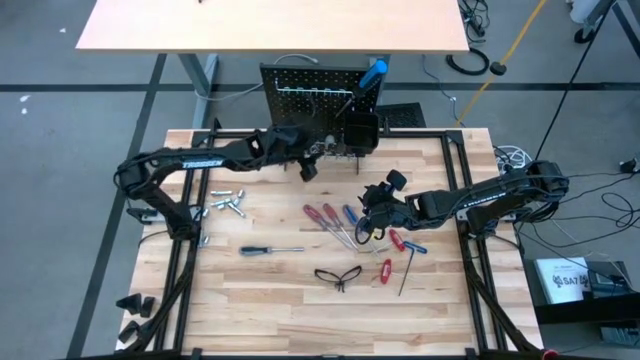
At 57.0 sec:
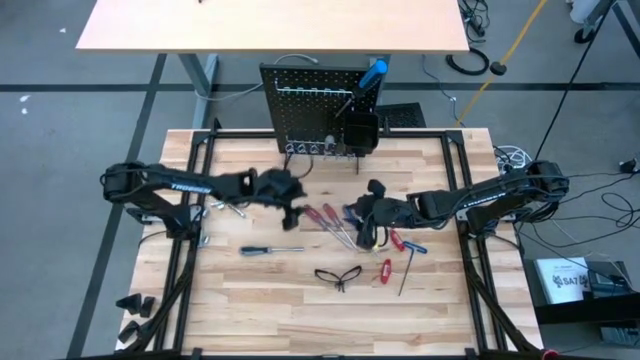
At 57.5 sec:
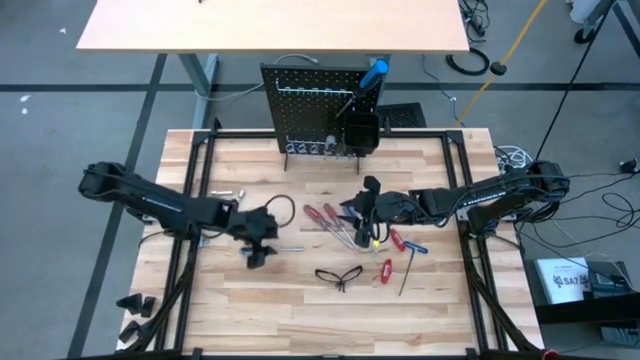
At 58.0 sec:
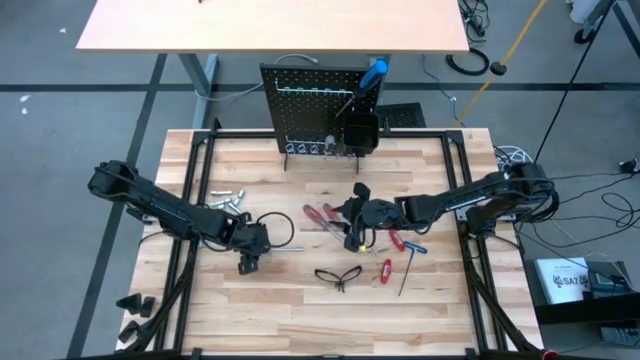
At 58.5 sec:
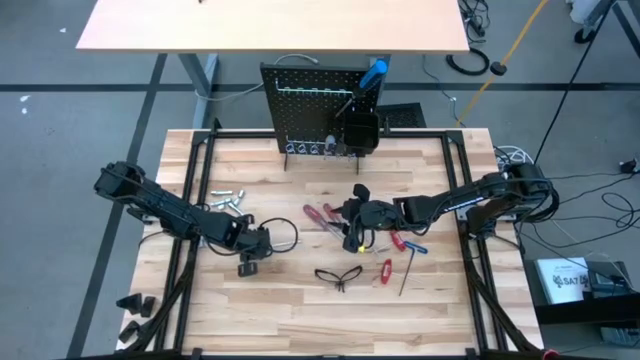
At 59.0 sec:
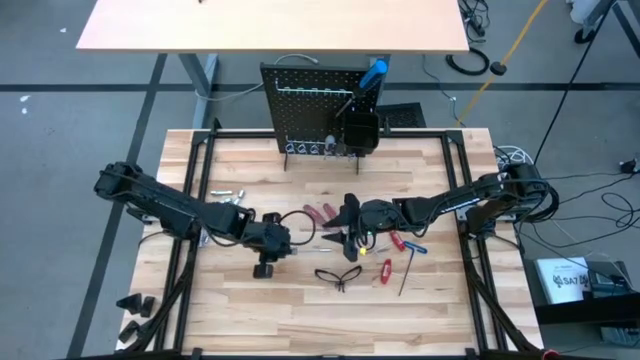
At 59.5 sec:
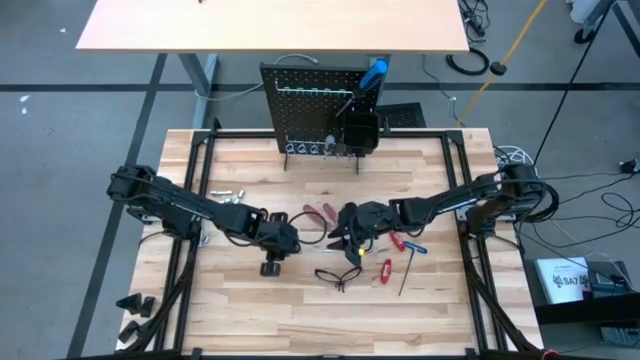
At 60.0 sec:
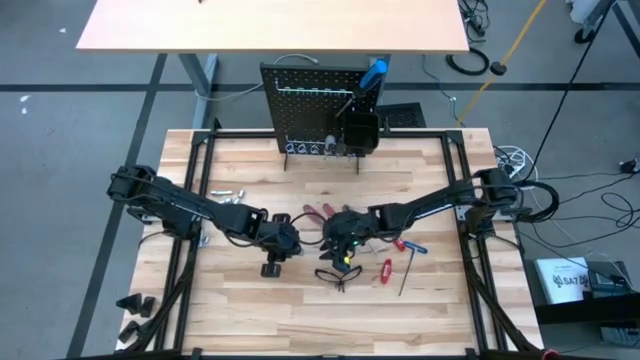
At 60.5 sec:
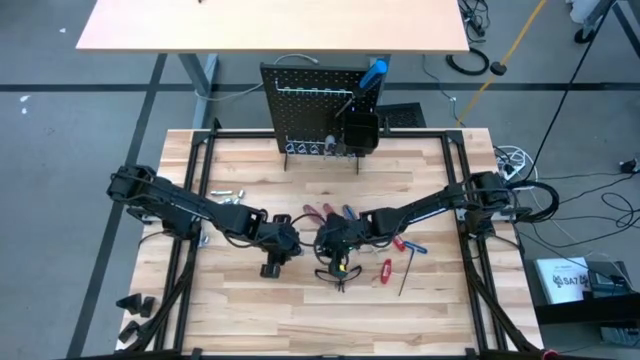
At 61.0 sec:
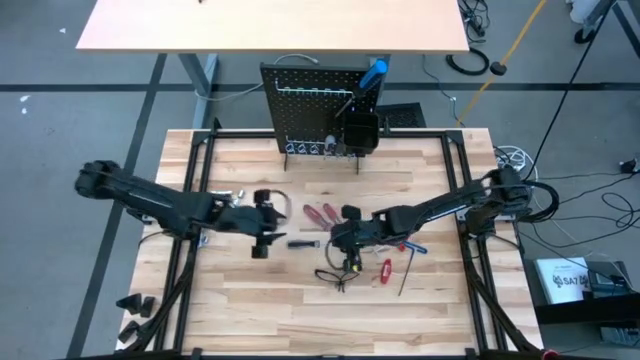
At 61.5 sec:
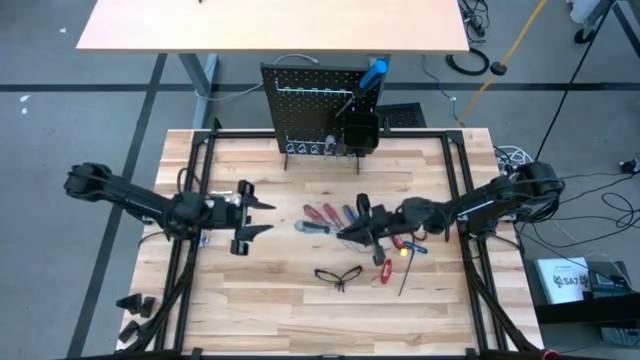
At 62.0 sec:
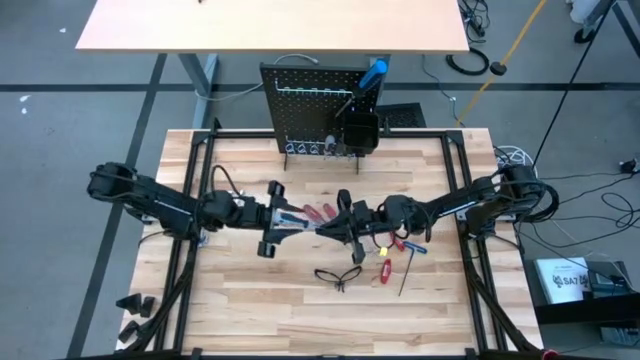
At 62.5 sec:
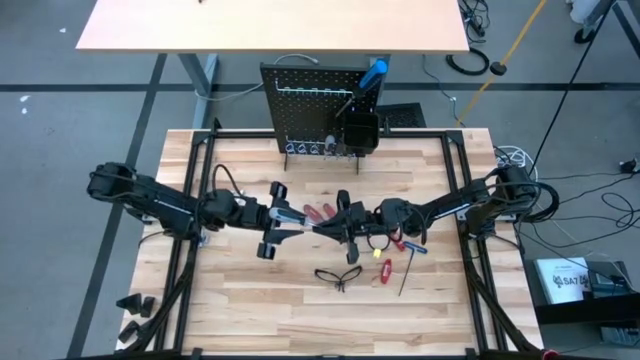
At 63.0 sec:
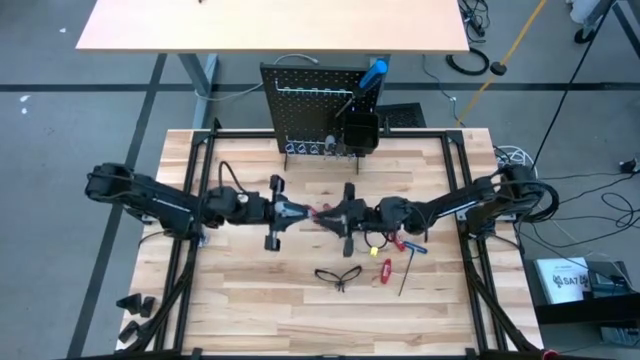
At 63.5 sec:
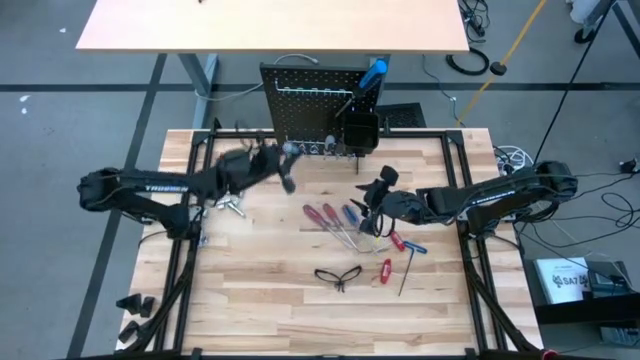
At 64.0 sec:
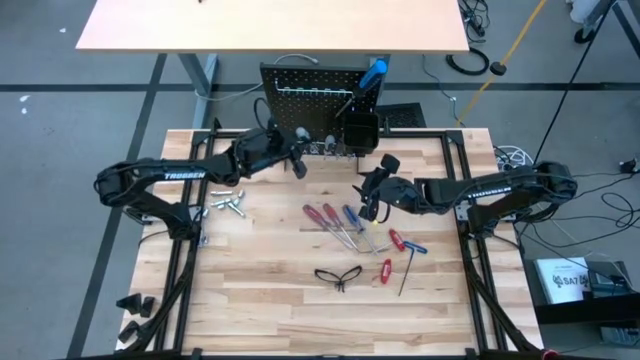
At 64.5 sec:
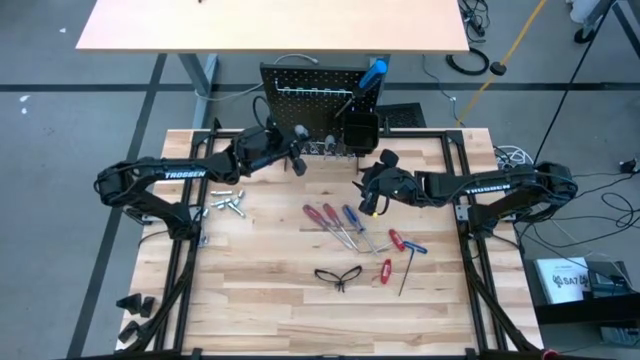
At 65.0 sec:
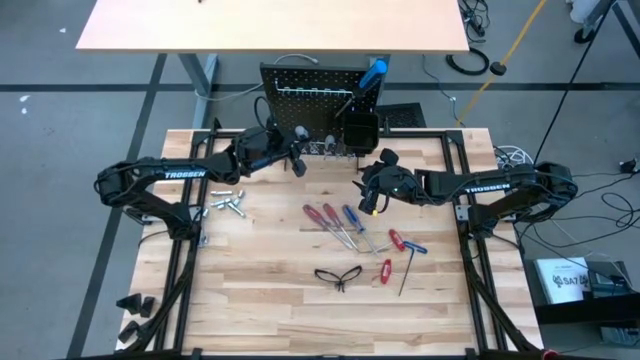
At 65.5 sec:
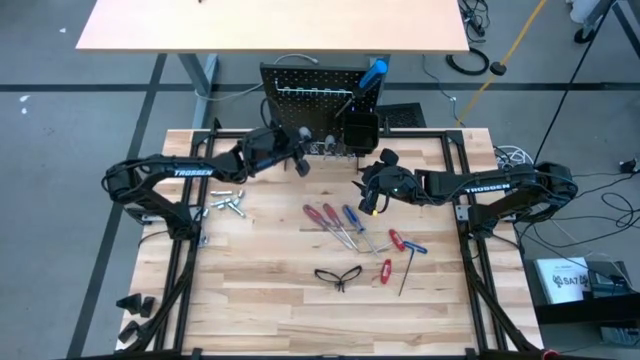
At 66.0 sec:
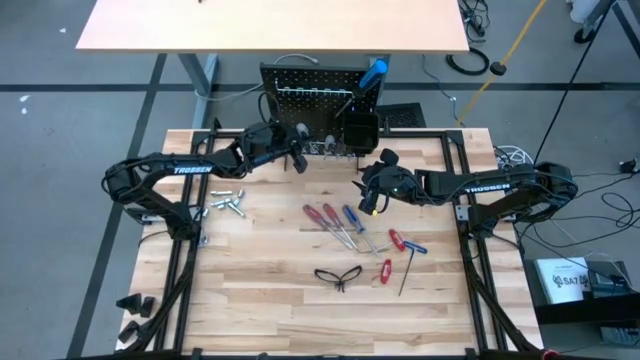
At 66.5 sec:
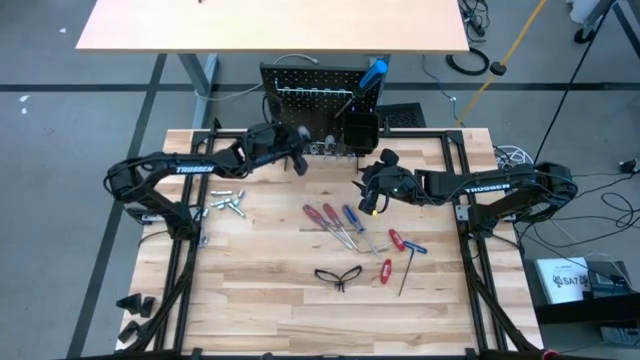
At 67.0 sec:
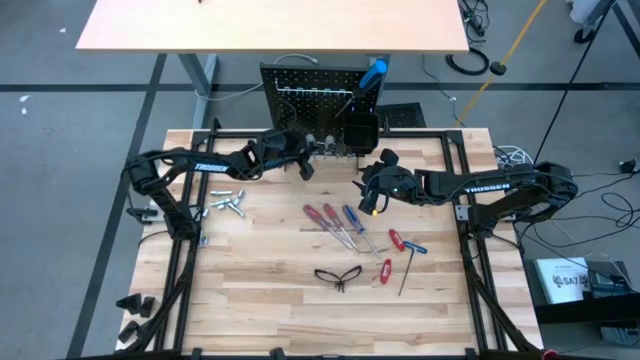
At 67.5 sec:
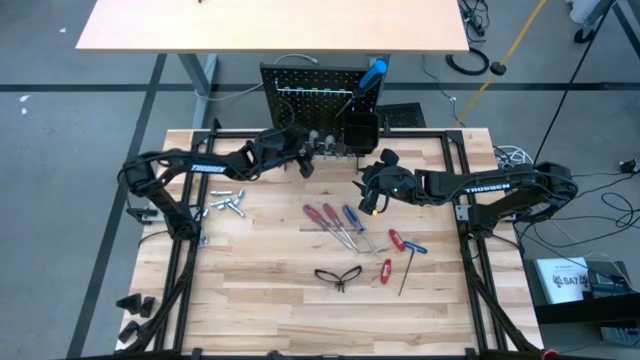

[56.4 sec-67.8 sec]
Task: Hang tools onto peg board
Hang the gray screwdriver onto the peg board

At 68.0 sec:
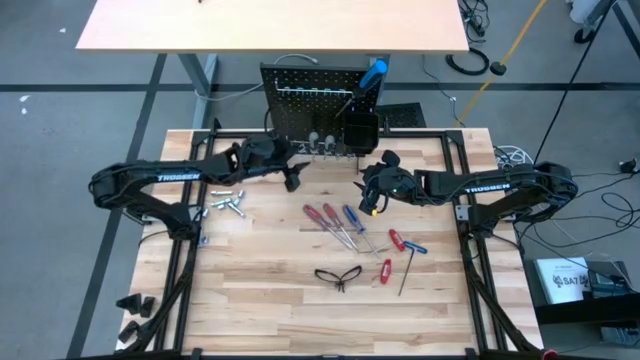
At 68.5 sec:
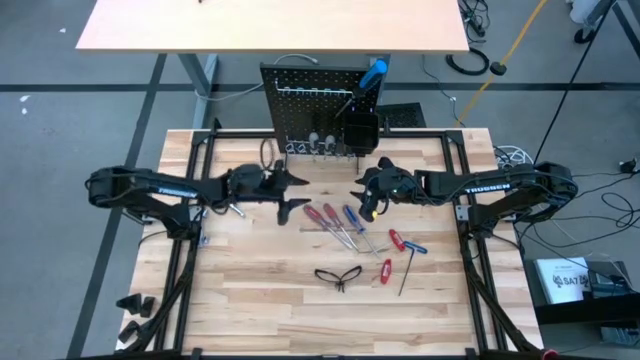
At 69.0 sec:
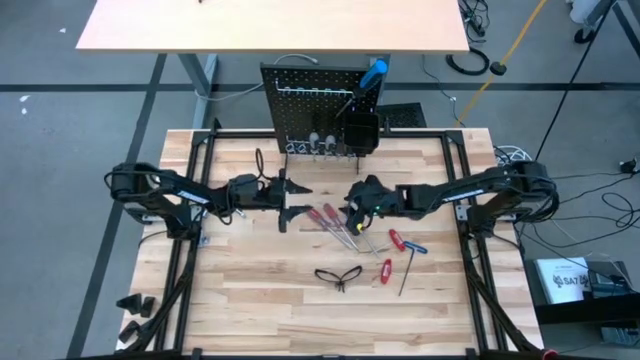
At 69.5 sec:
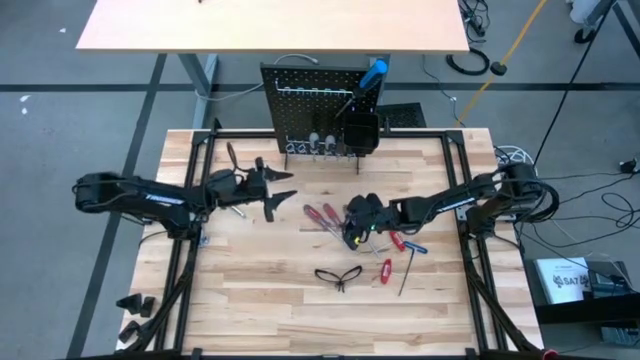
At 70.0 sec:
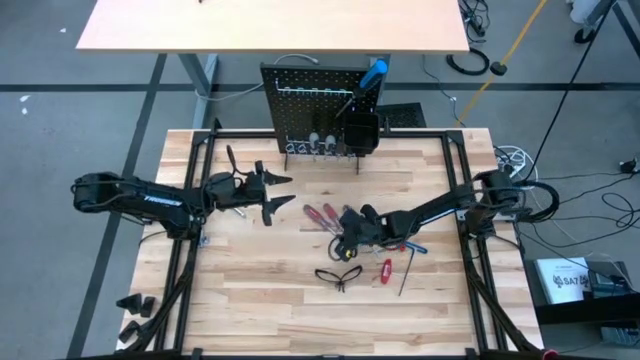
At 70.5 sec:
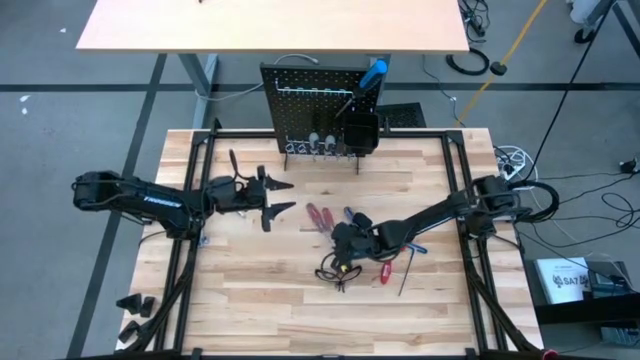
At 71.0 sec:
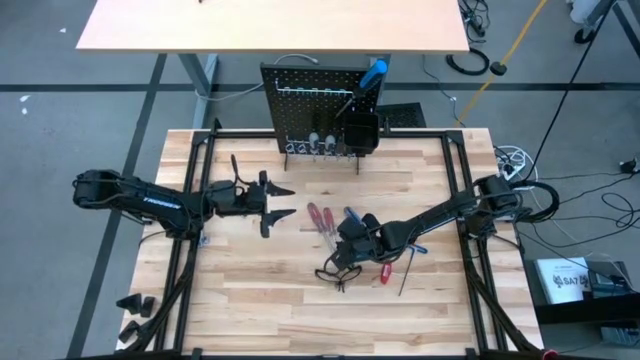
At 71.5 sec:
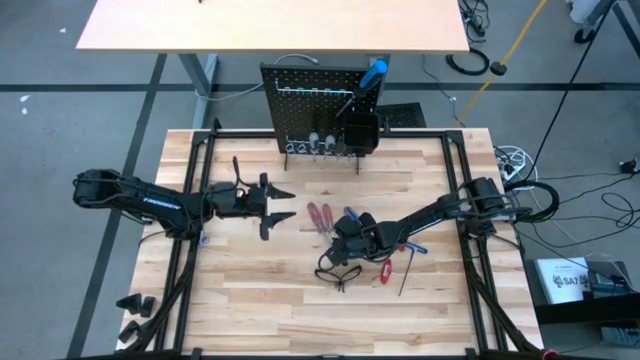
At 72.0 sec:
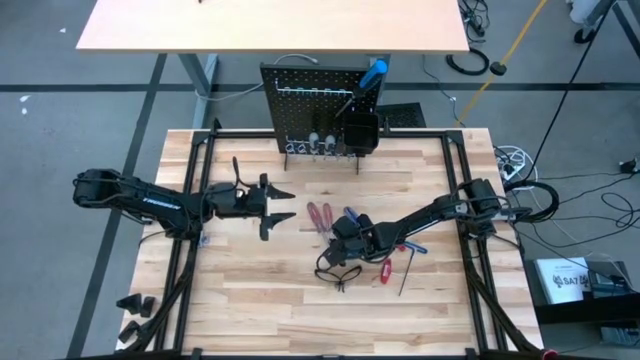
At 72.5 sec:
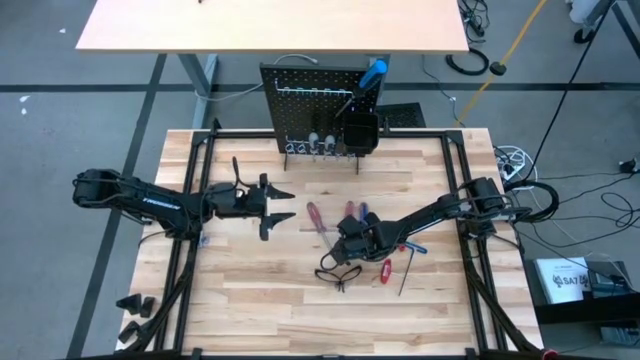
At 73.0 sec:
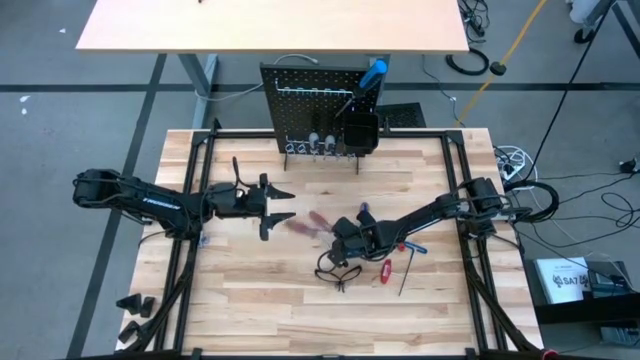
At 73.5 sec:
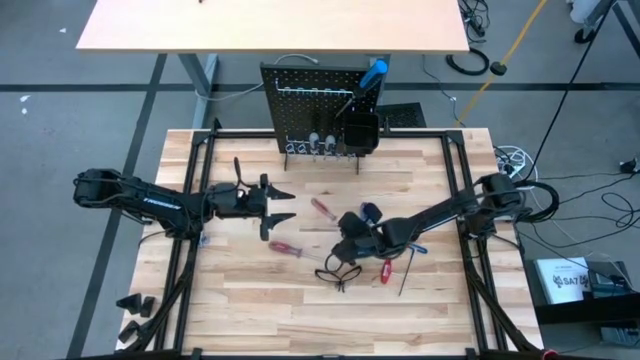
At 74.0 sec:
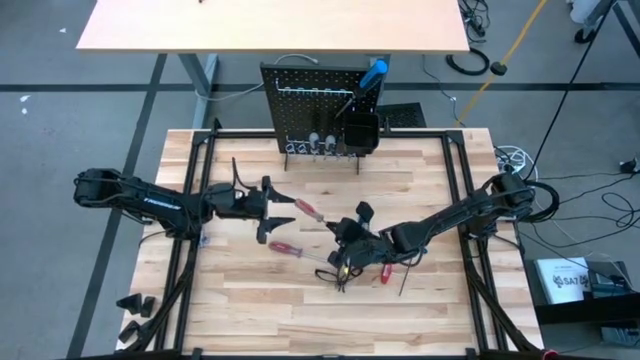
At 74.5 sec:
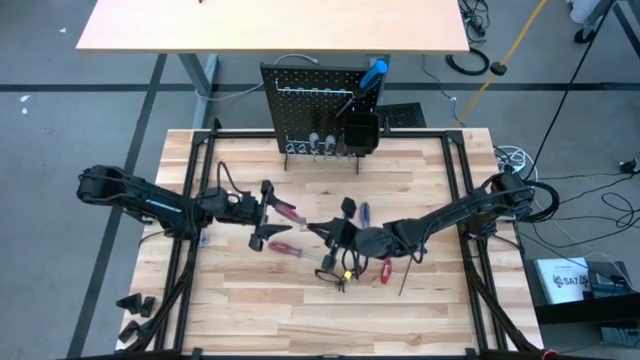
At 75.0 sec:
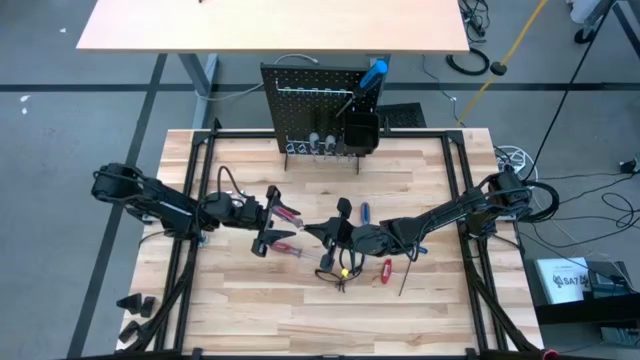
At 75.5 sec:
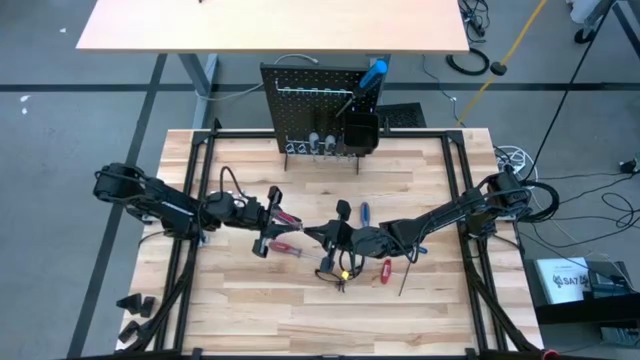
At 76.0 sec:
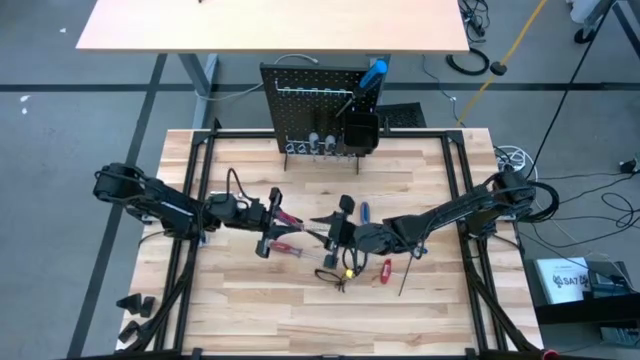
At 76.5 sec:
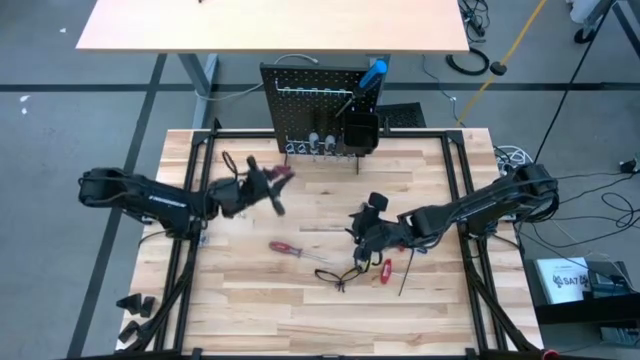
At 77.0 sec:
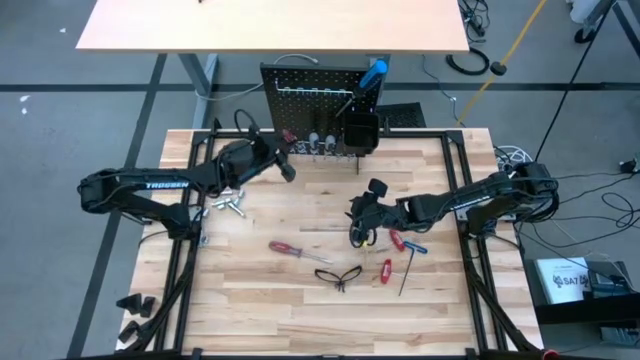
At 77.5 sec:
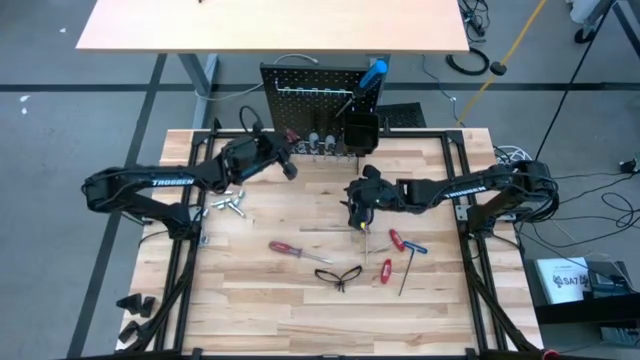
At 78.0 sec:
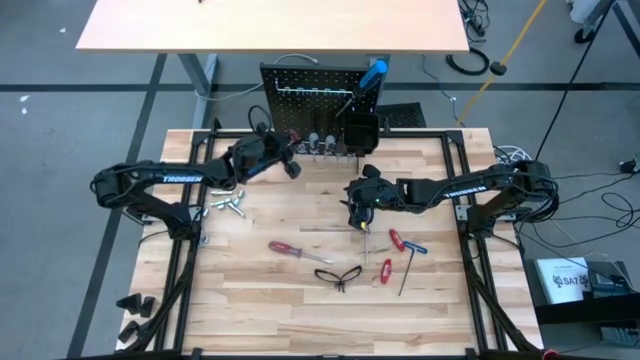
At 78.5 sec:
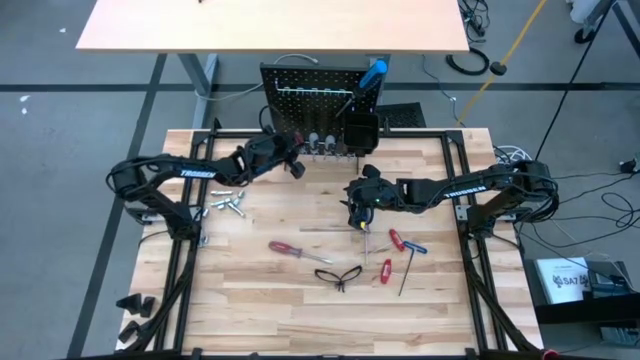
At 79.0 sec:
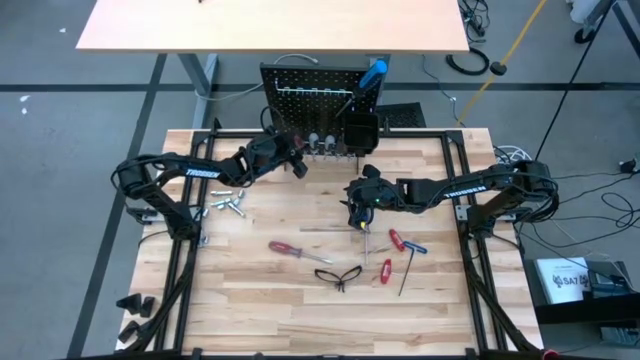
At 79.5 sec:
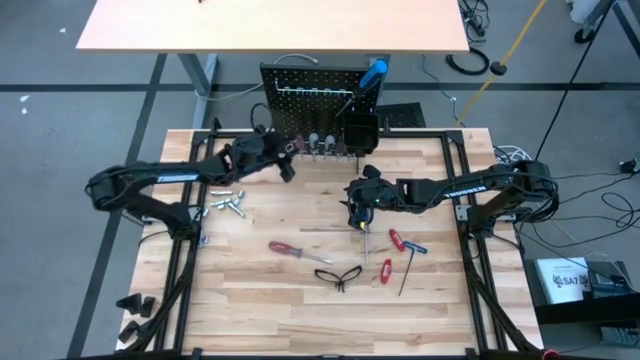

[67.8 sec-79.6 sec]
Hang the red screwdriver onto the peg board
